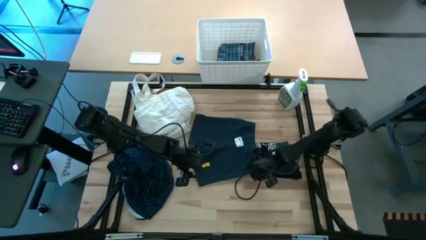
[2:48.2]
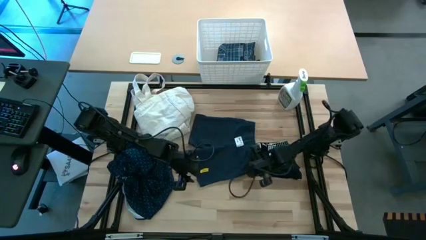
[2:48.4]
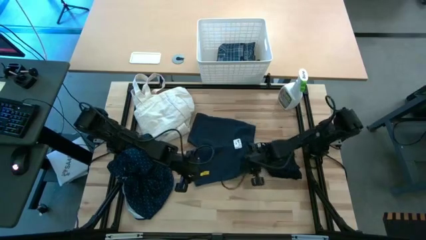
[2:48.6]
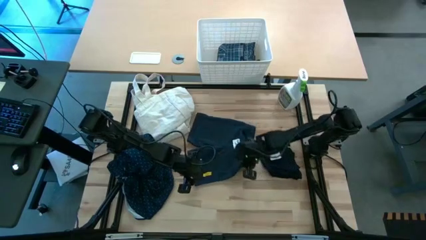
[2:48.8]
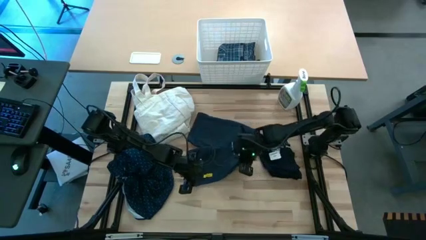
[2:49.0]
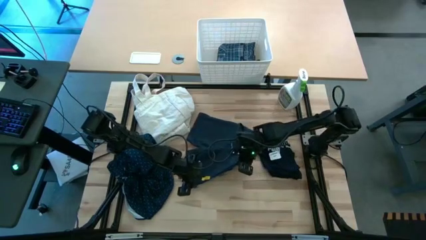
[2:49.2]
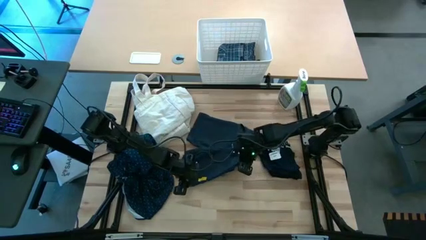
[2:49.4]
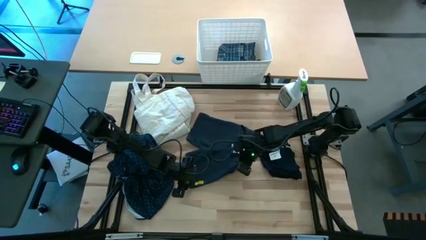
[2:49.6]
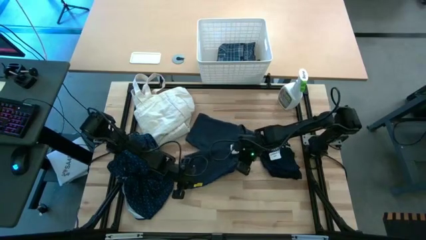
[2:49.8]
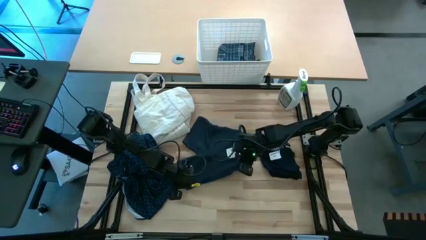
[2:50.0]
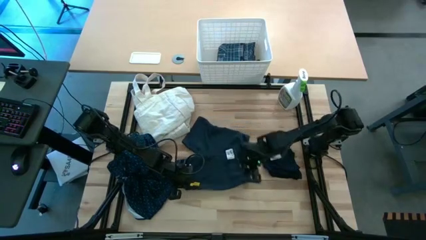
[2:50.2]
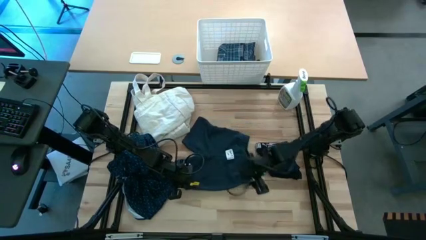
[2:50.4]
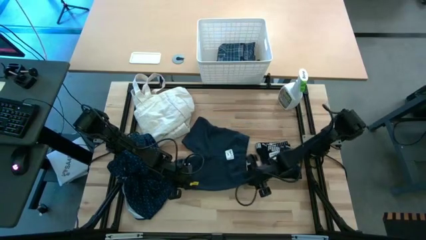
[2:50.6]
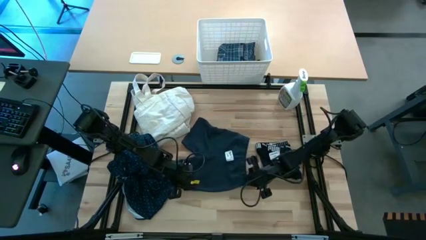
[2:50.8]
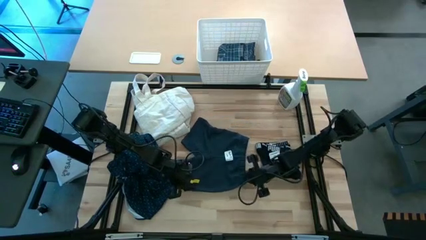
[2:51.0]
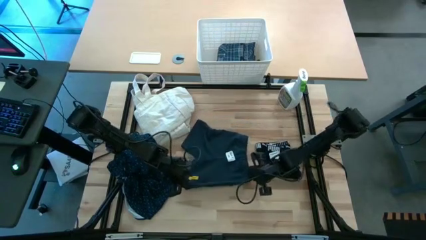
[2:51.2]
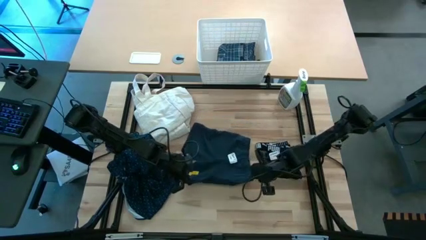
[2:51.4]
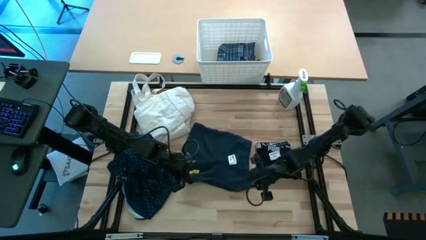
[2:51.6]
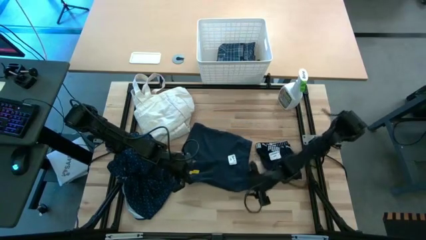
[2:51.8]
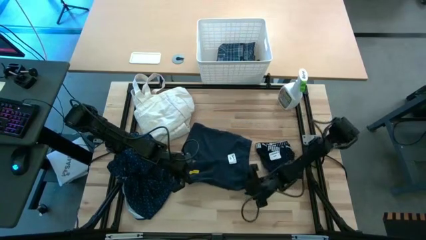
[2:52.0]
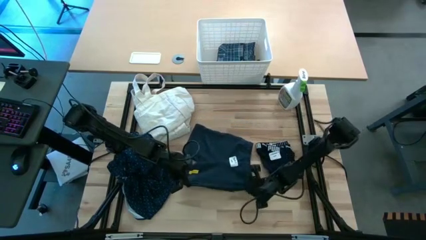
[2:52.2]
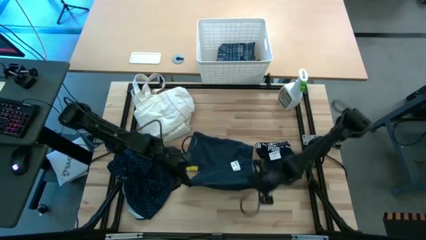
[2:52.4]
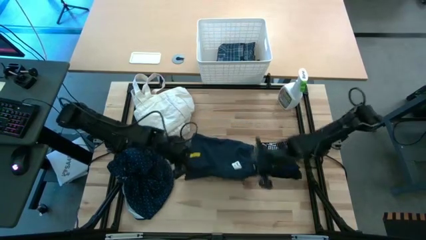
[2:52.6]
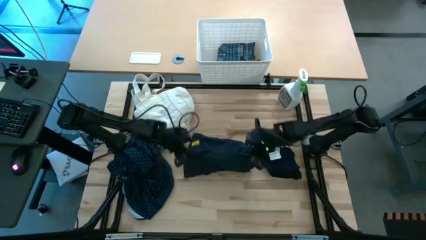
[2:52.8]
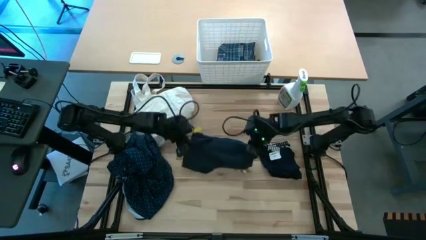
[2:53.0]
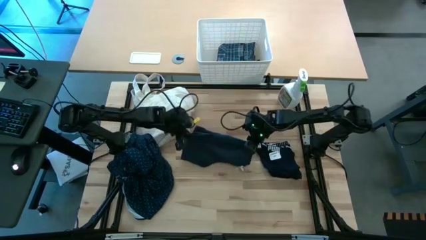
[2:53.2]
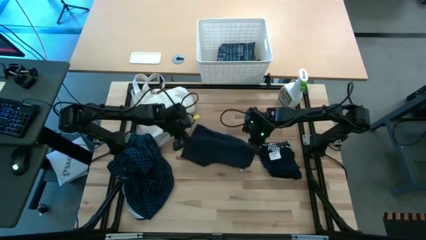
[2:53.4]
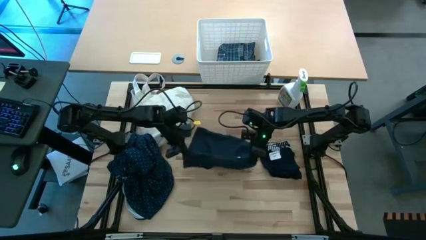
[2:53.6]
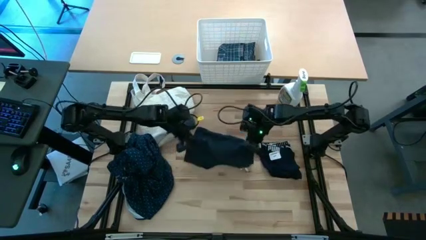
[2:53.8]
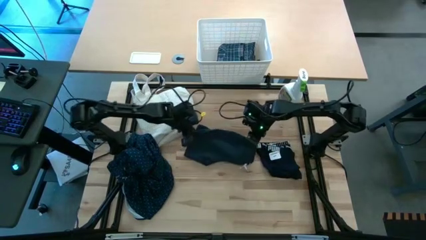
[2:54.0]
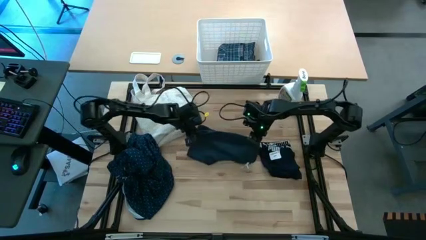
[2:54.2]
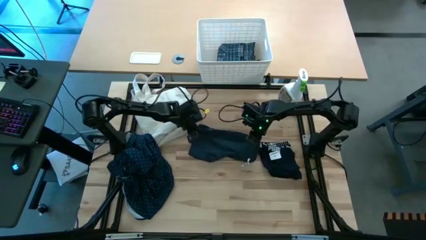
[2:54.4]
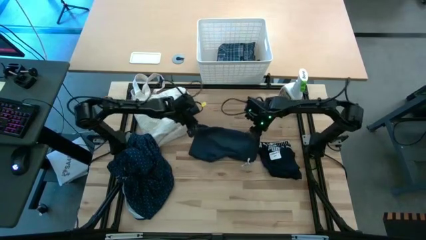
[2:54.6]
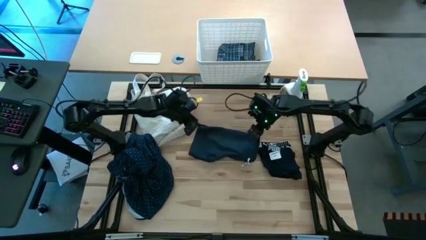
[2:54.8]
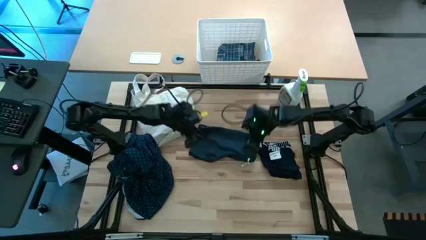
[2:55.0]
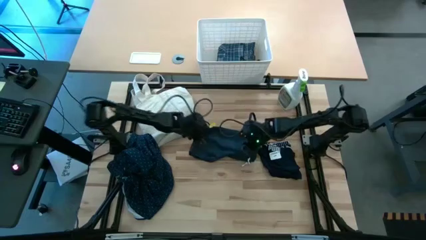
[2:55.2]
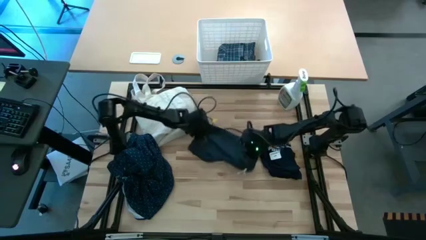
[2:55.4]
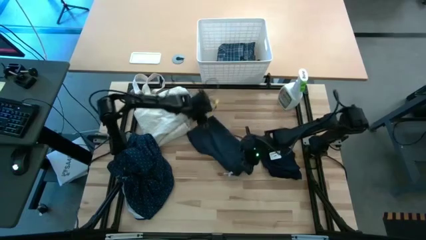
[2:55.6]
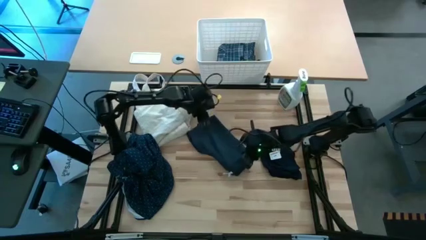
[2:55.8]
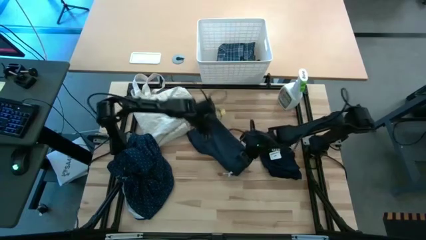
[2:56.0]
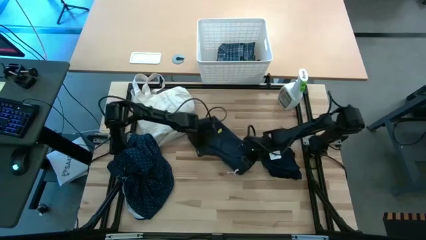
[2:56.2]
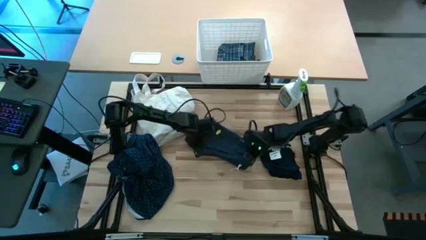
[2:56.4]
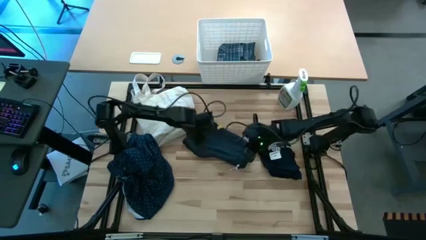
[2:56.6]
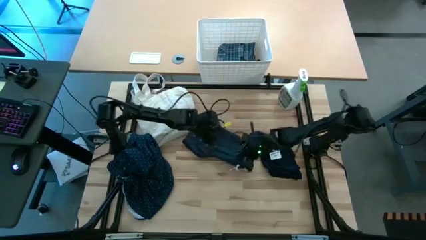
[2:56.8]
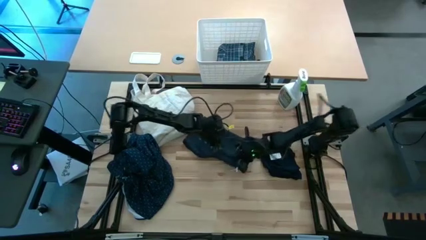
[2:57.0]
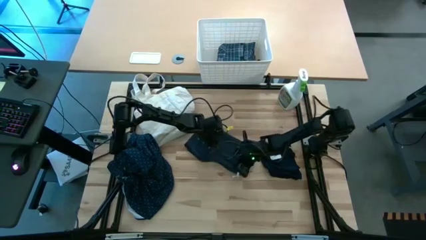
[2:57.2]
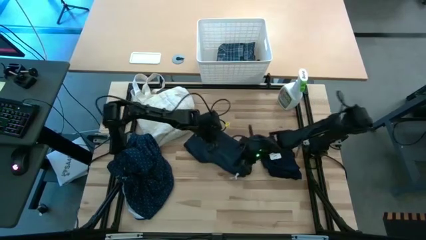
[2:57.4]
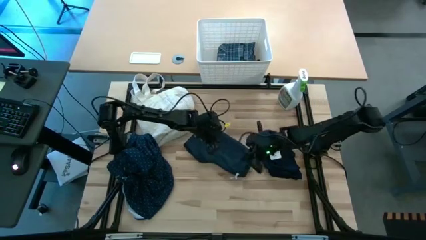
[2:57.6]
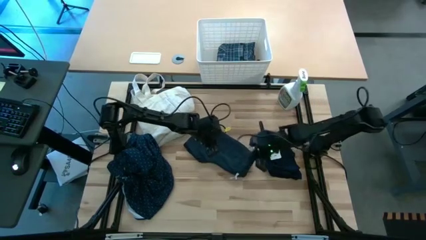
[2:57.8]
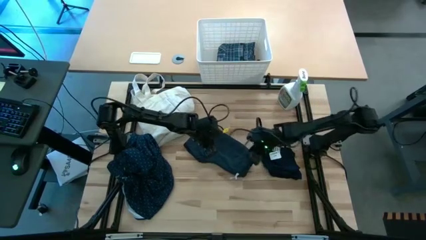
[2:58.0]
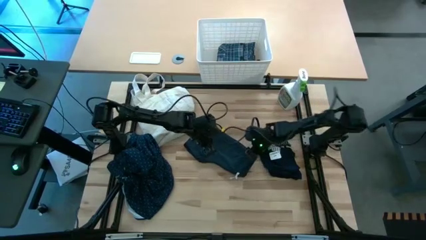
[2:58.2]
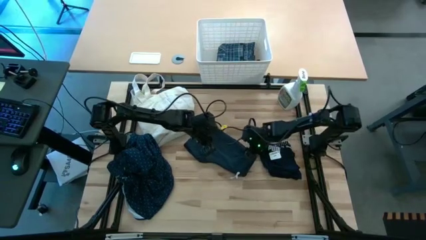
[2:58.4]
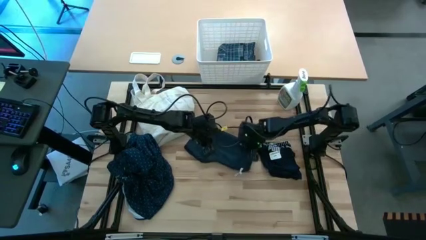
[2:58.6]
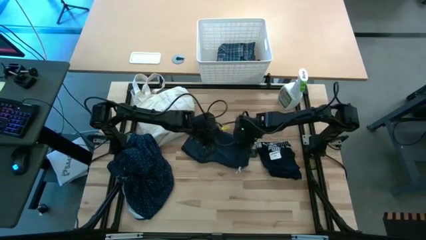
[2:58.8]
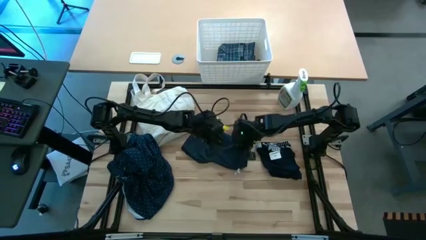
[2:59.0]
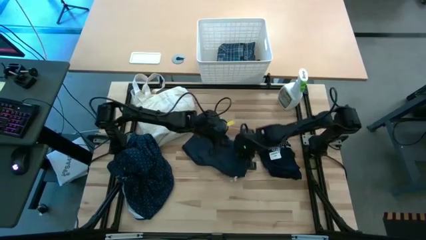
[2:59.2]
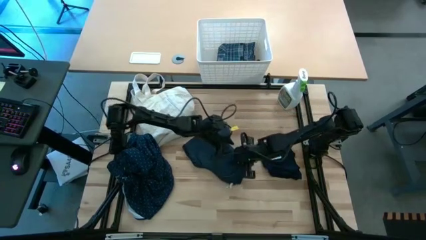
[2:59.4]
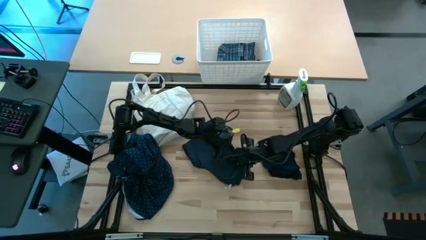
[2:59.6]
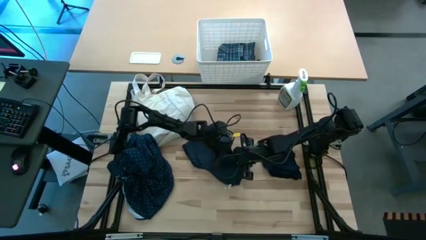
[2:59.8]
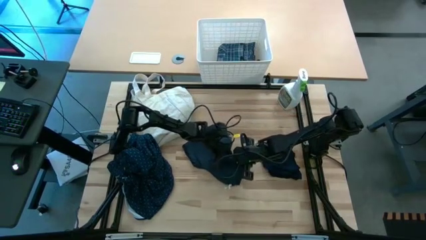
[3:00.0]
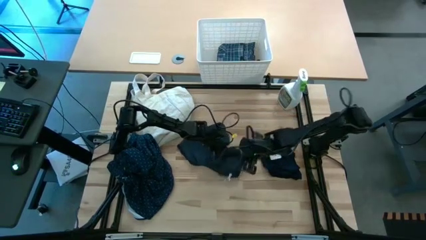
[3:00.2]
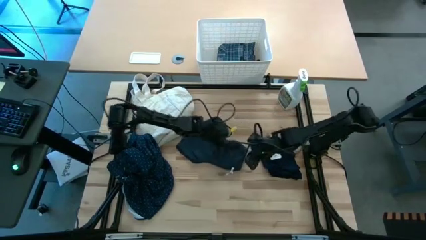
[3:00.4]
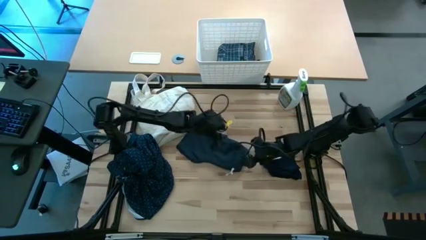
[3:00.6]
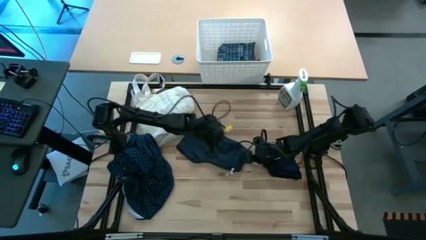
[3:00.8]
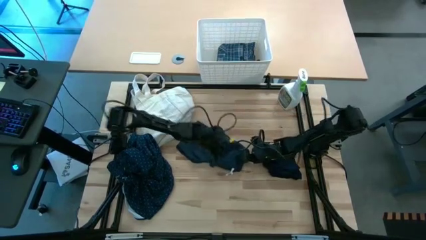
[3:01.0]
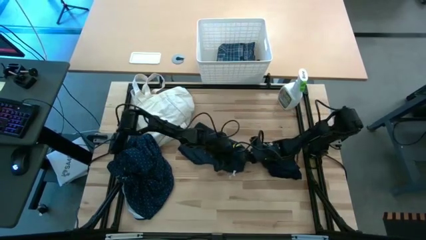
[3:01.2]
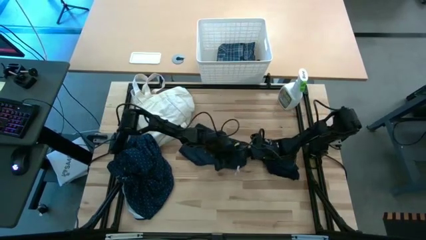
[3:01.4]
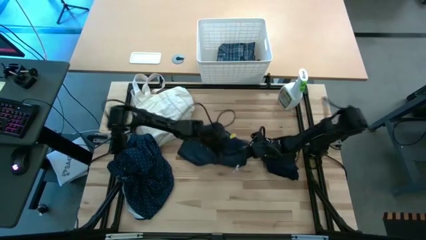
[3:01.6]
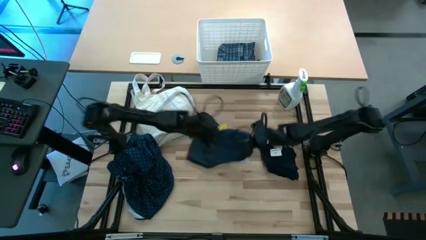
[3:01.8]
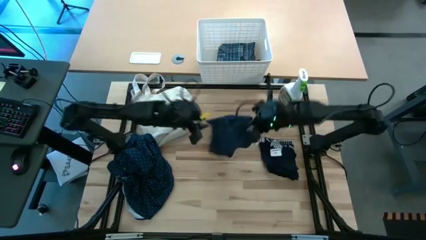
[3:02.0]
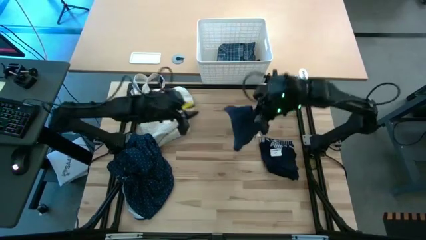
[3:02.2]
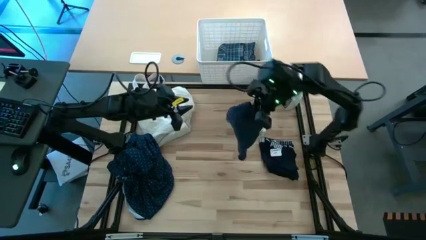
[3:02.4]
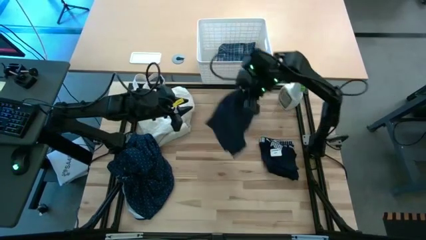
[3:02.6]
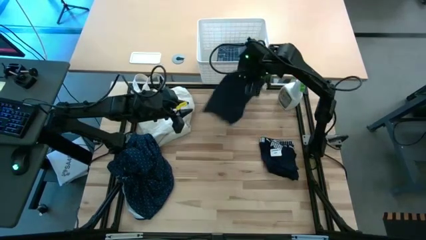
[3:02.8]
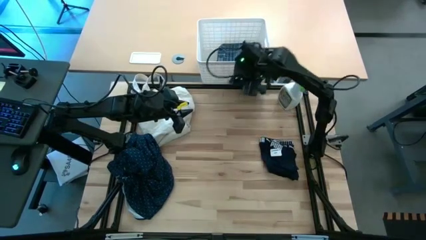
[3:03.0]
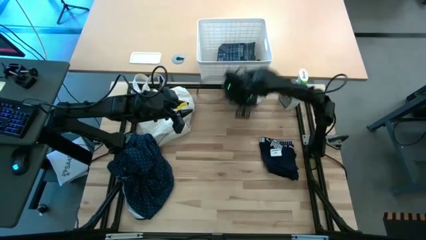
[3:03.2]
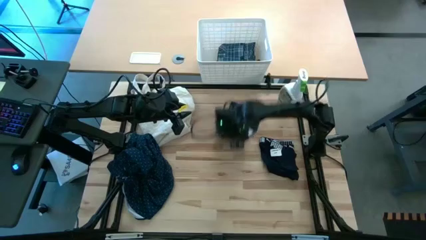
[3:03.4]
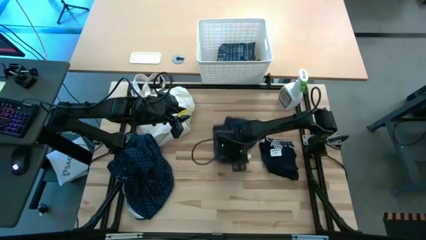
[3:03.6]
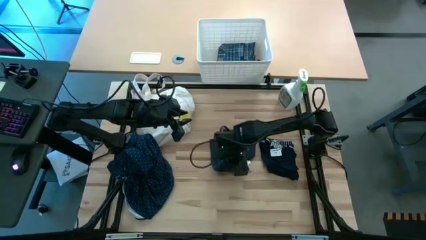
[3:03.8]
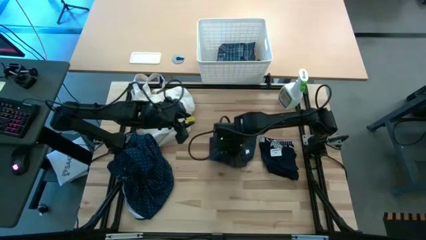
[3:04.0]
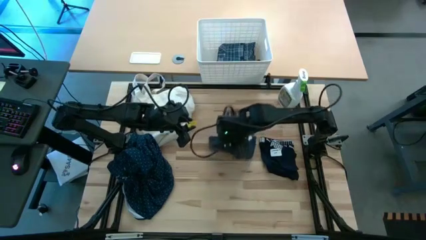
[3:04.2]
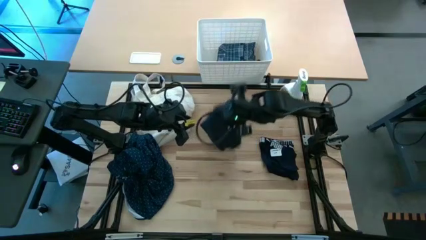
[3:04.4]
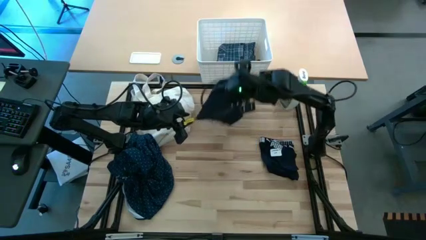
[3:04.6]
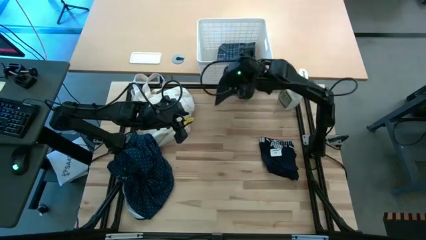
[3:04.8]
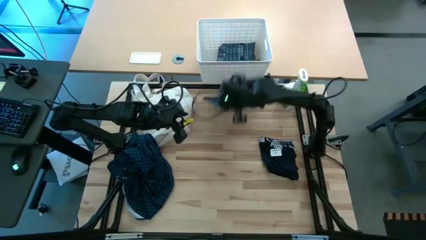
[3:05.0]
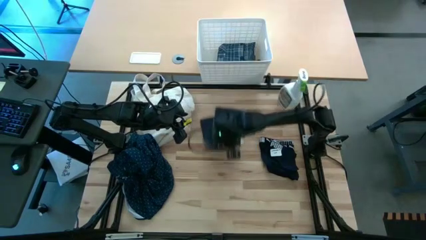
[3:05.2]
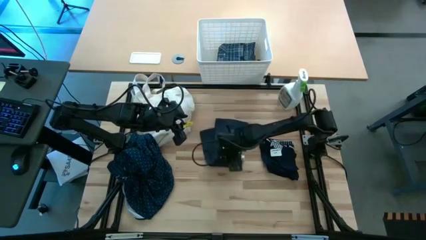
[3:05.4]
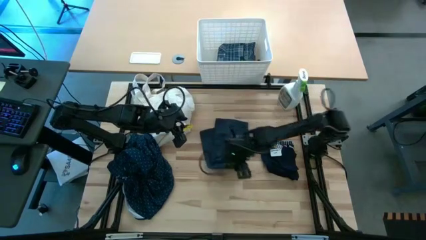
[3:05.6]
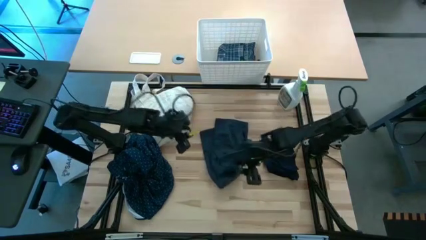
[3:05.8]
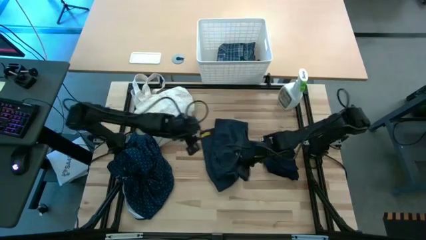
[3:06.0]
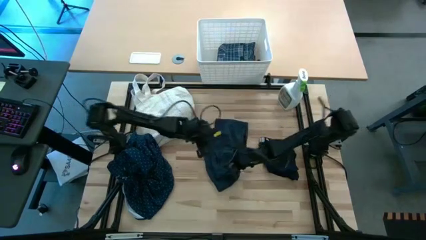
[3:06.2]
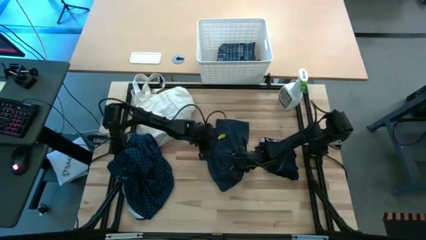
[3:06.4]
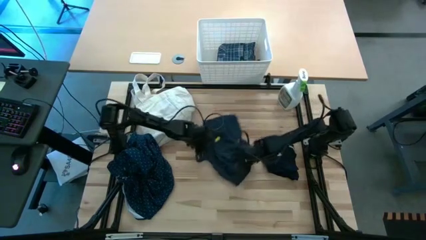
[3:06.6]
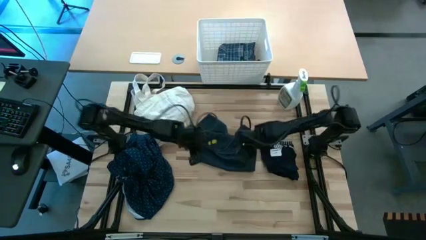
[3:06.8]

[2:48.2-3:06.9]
Fold the black short
